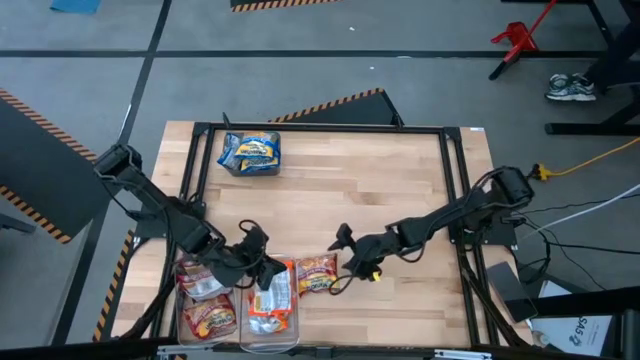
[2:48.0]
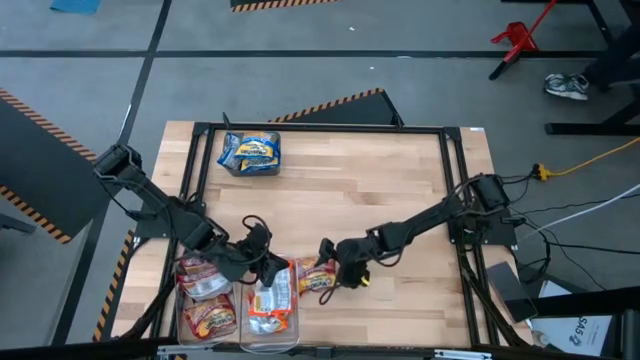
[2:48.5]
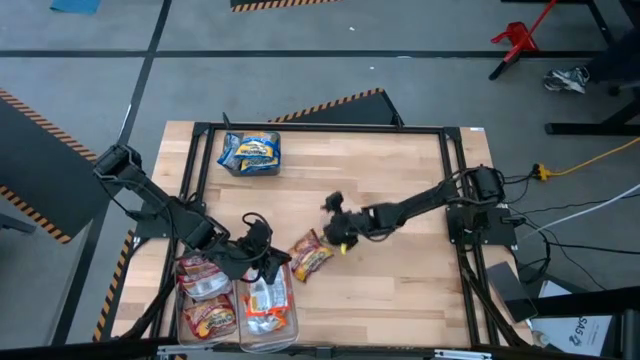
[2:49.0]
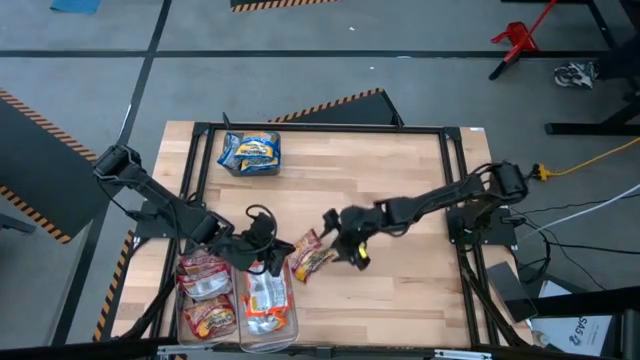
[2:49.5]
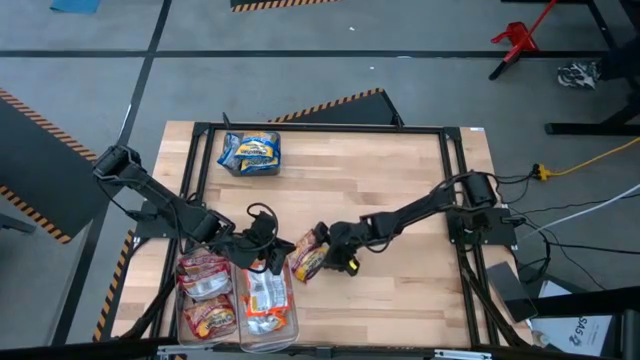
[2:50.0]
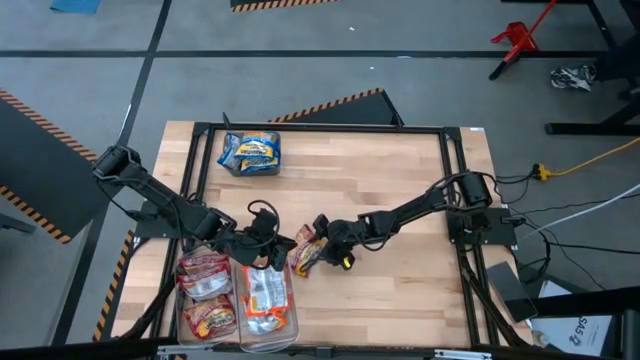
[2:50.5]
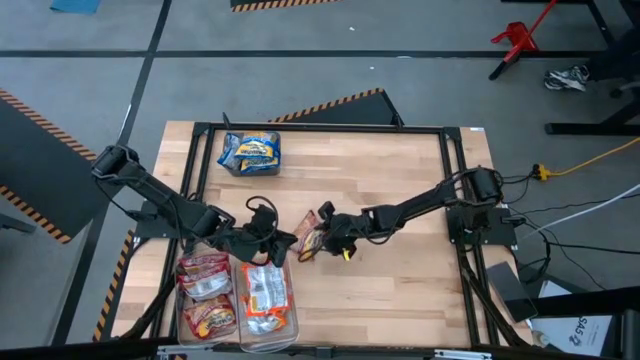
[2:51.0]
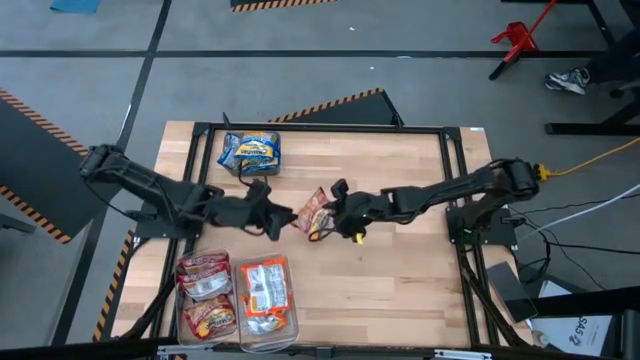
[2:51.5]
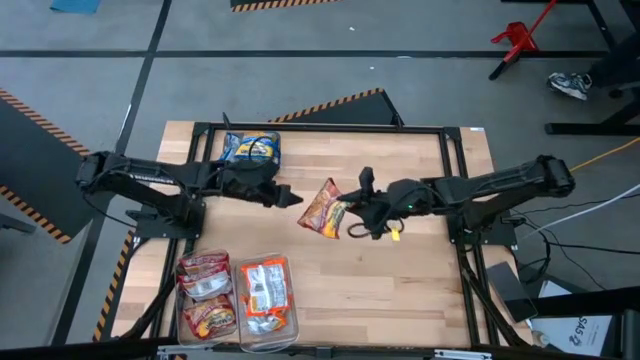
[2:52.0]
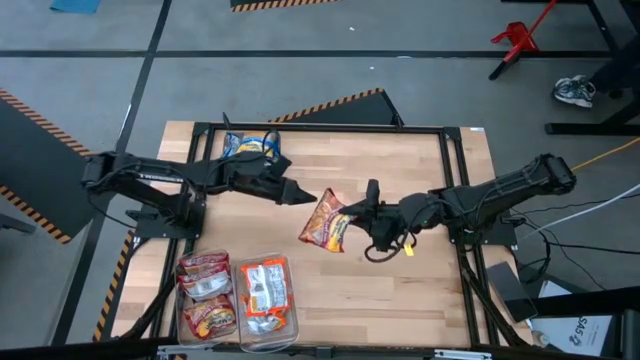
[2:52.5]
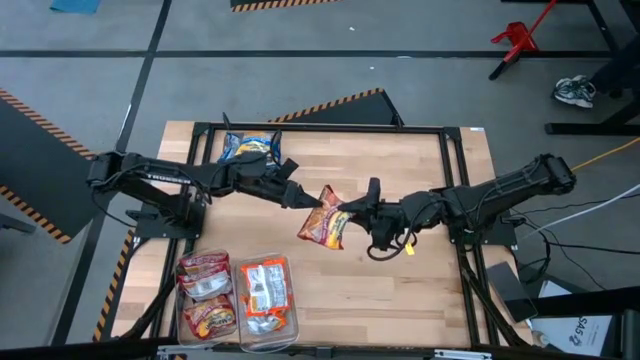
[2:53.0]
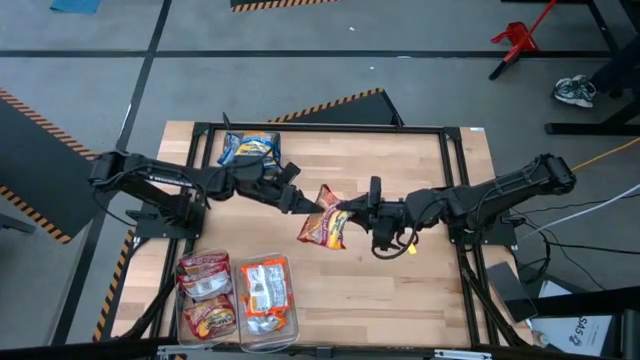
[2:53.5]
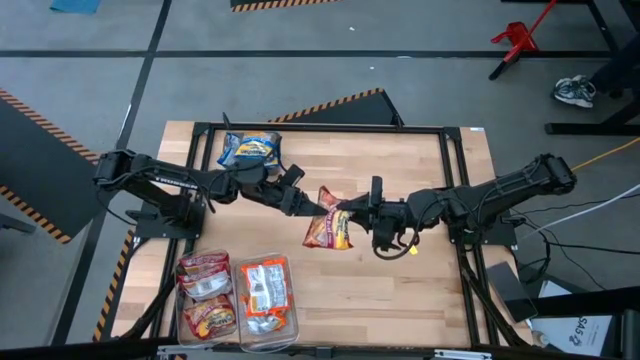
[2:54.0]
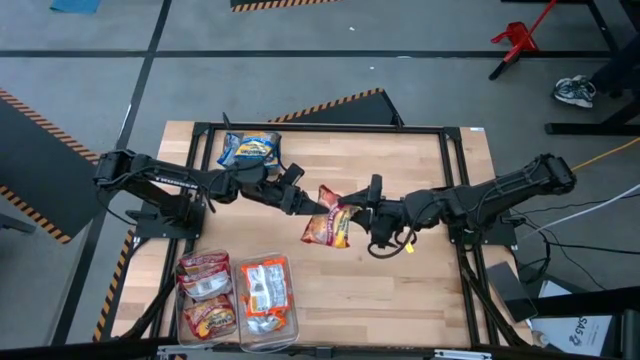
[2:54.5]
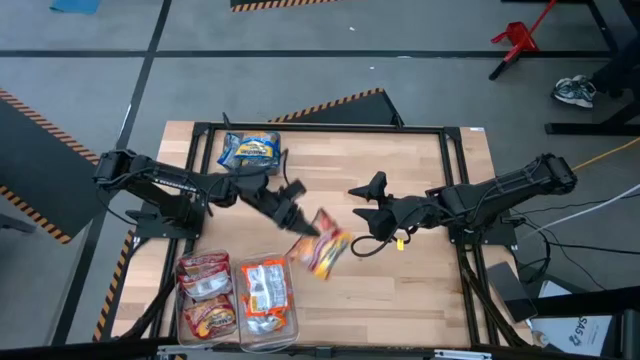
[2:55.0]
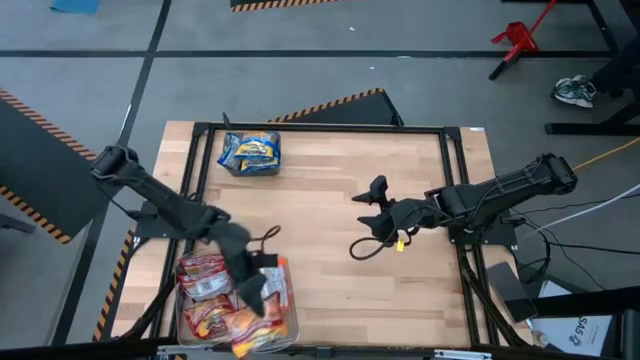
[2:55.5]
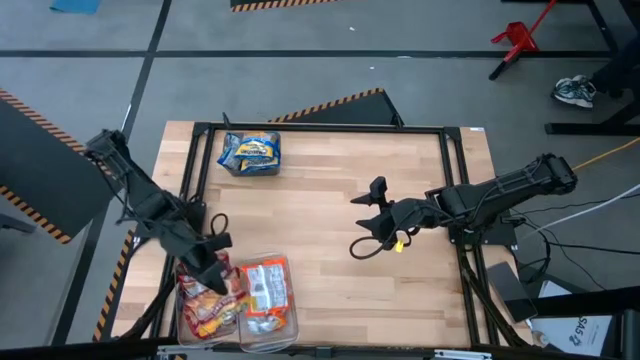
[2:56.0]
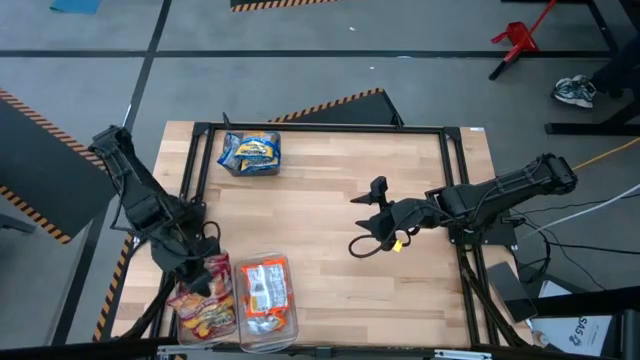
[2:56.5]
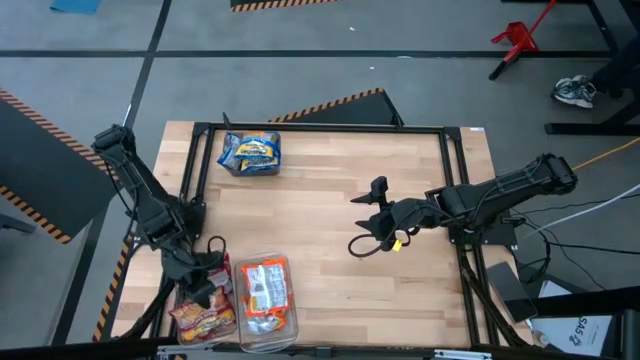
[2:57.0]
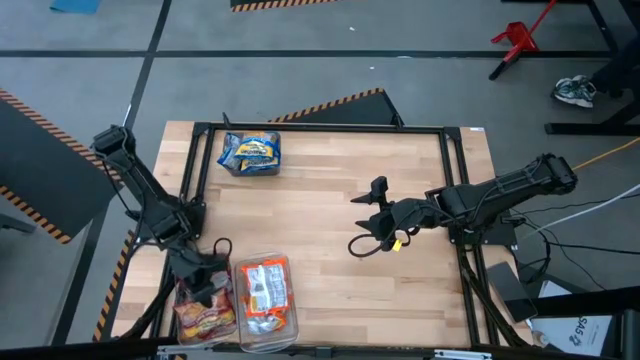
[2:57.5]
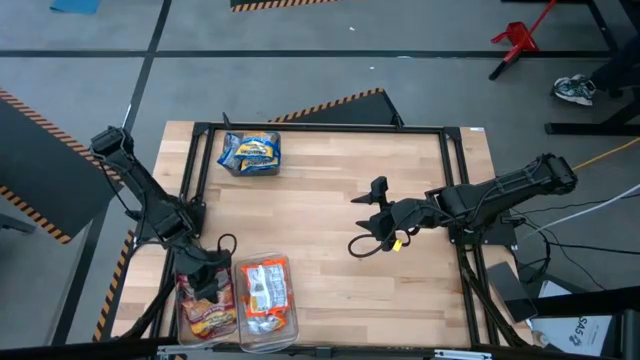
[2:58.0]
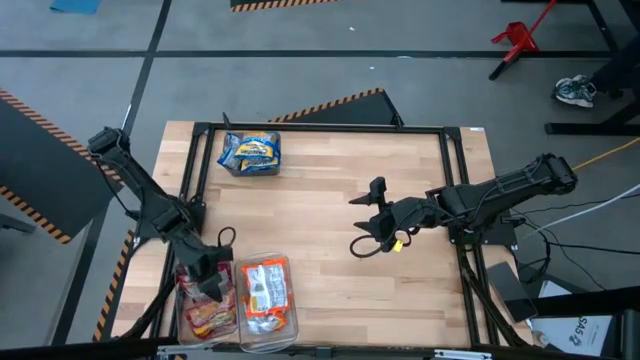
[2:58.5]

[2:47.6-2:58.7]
Task: Sort Maruchan noodles
Put the red noodle pack into the left transparent bin

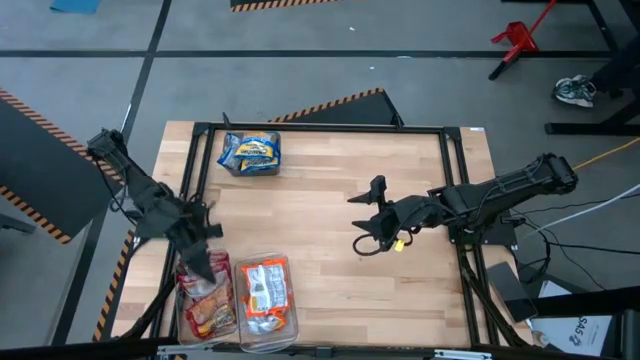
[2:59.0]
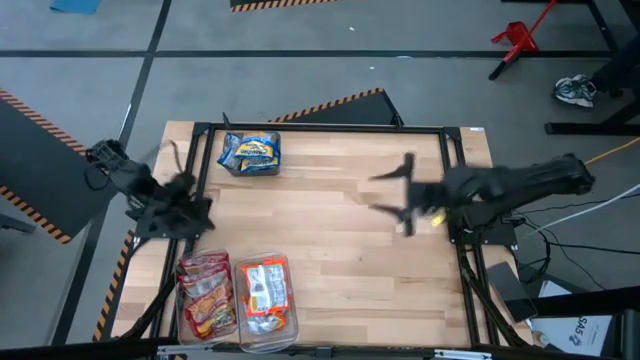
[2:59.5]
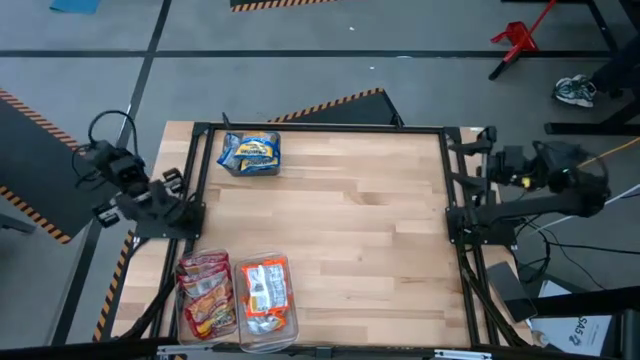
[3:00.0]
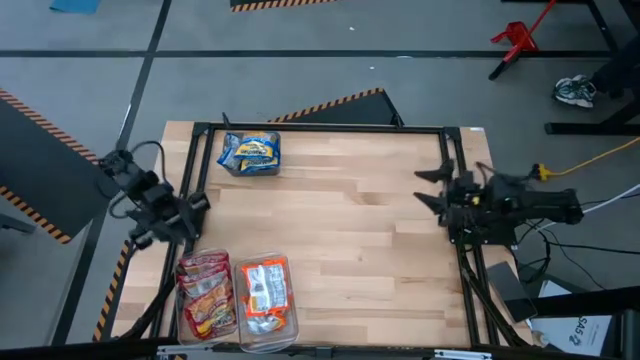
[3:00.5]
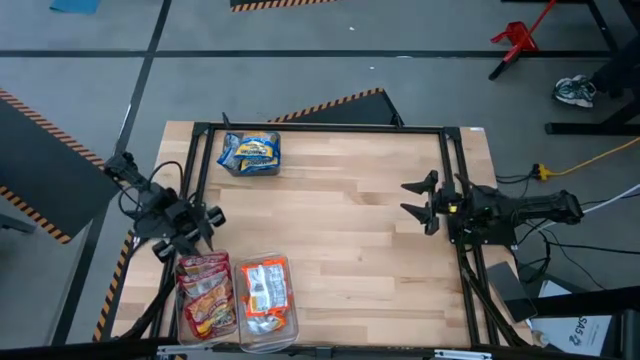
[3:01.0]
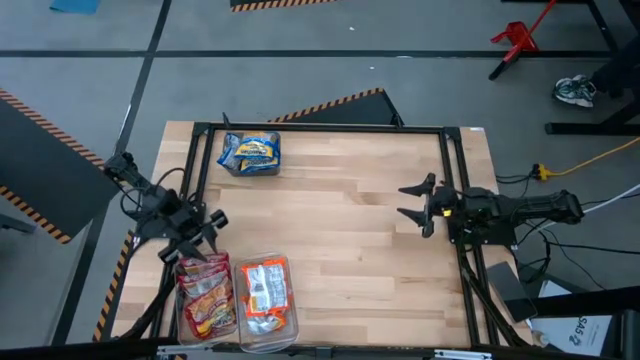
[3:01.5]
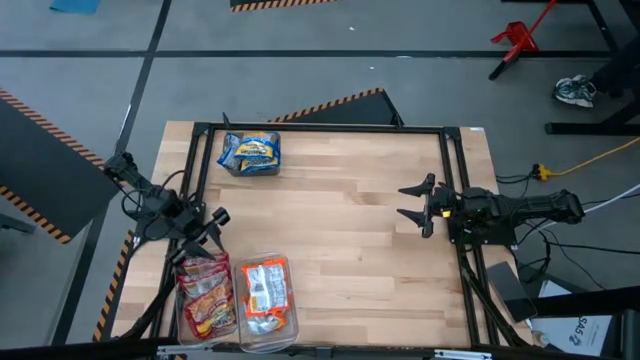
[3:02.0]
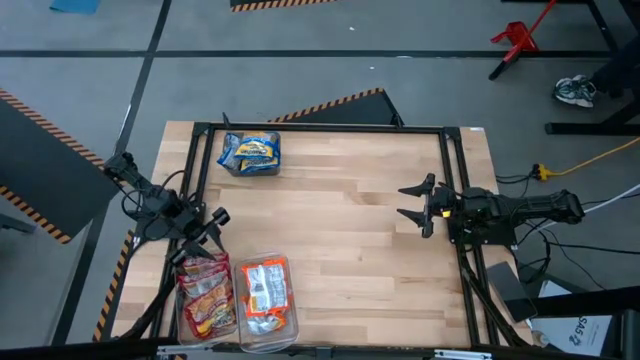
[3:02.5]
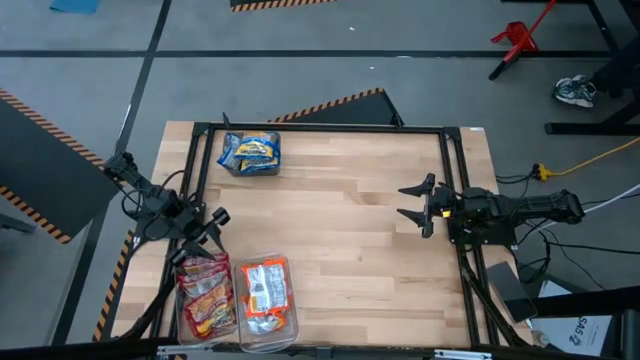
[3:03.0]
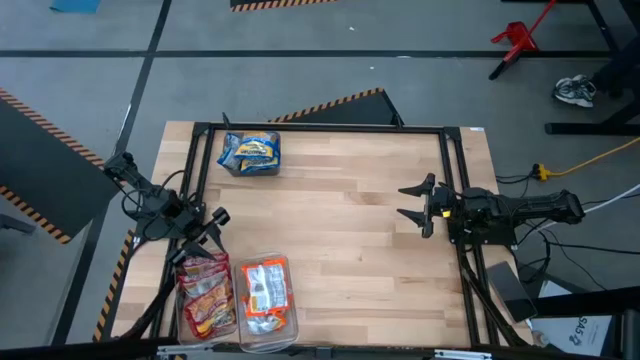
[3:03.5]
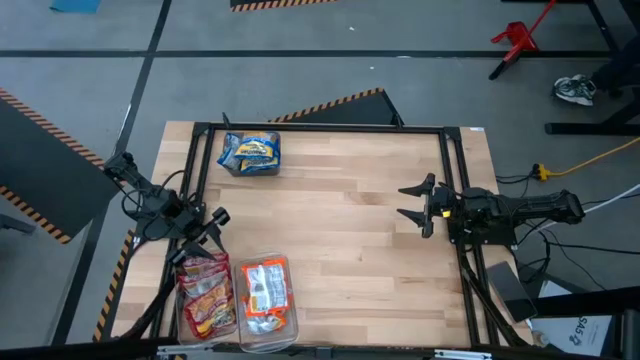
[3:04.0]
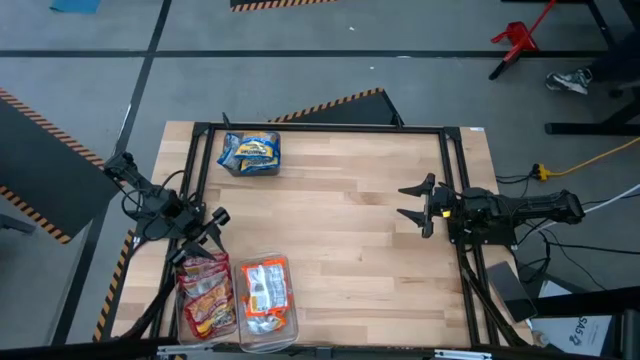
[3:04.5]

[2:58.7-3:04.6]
Return to Home Position

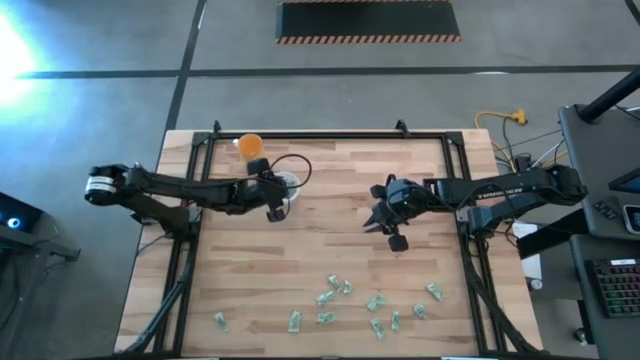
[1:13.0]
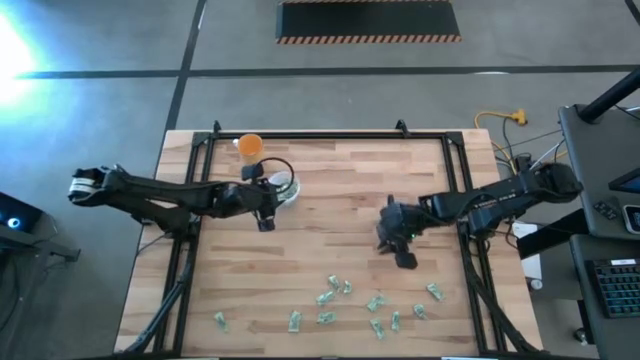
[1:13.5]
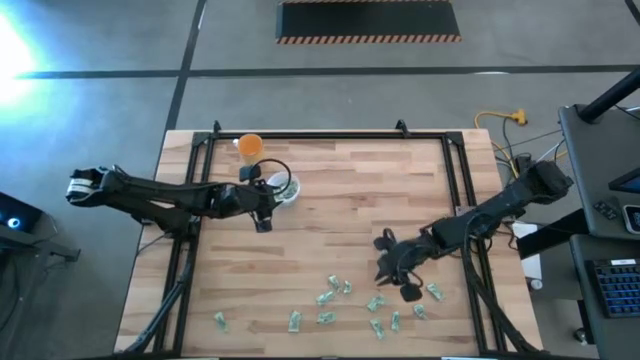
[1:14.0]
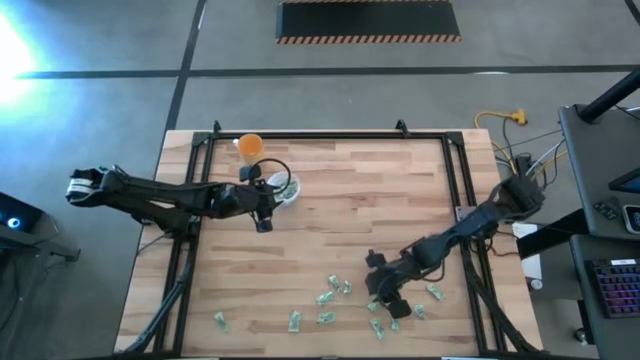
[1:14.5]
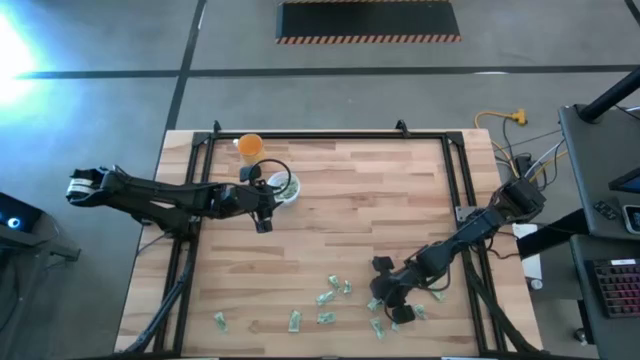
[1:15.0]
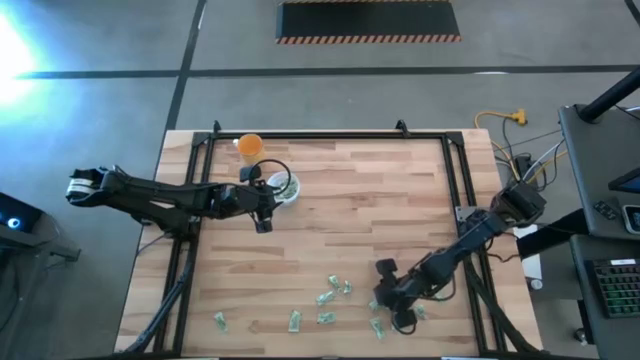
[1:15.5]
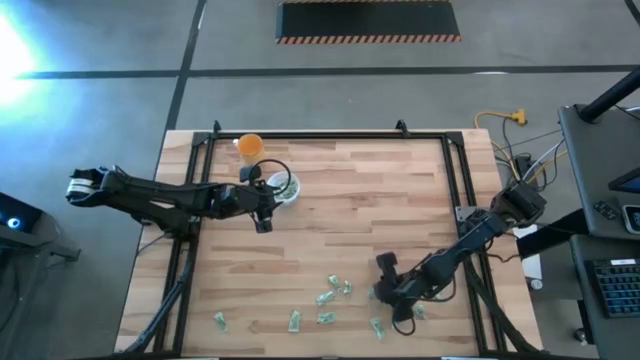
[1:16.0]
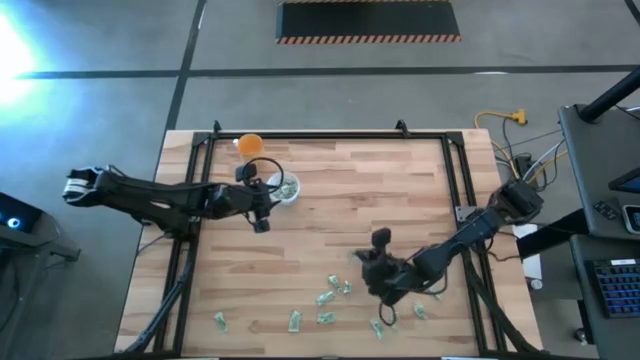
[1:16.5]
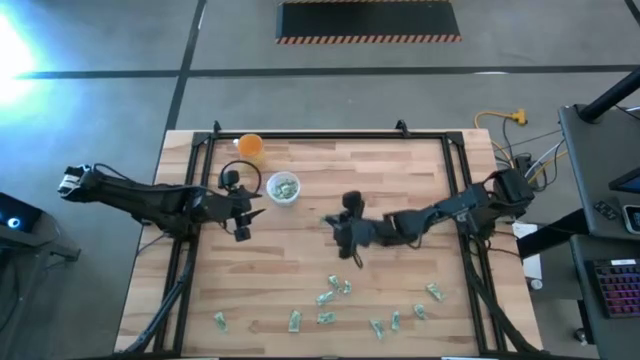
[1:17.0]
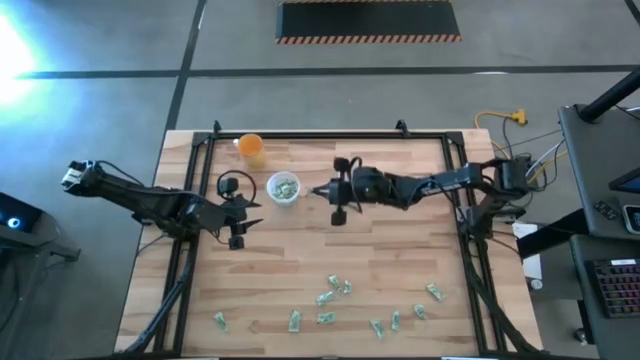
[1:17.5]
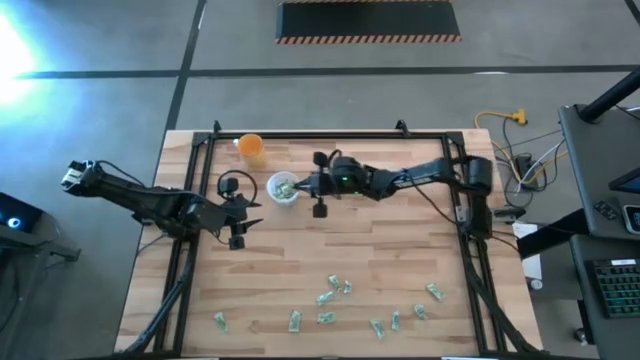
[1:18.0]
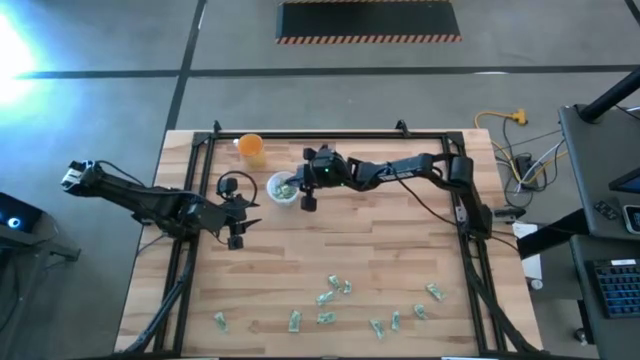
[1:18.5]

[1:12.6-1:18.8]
Task: Pick and place Stevia / Truvia into bins
Put the stevia packet into the transparent container
